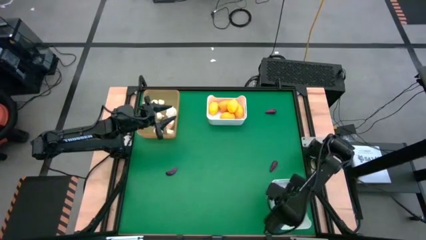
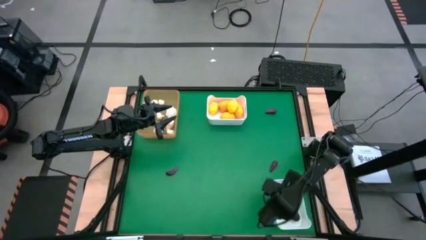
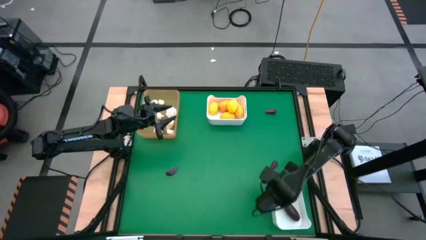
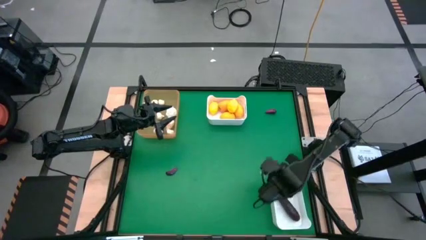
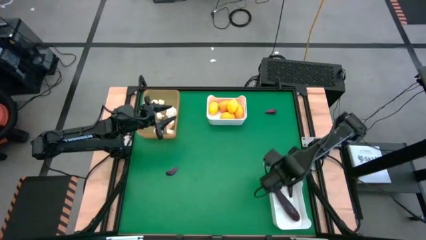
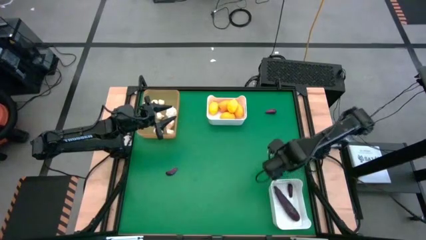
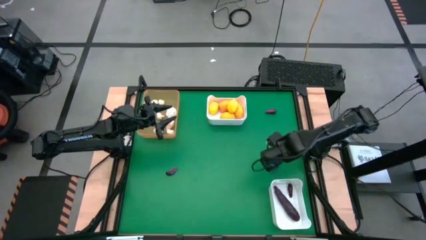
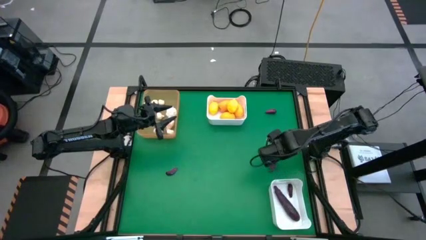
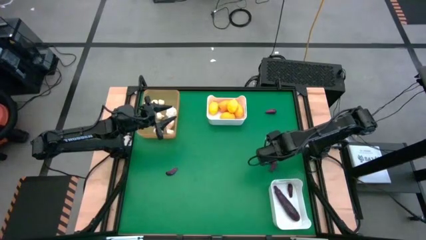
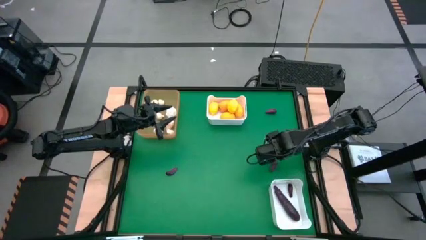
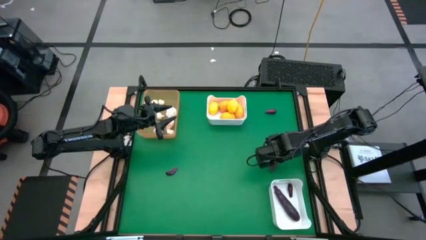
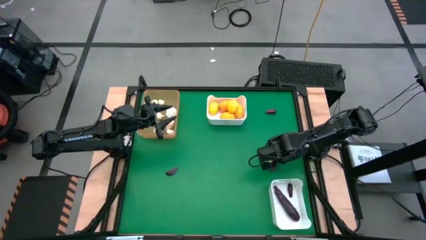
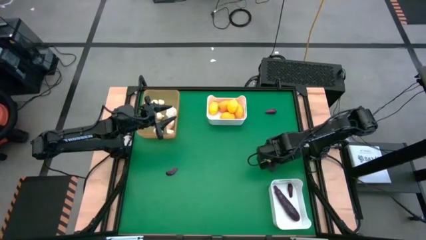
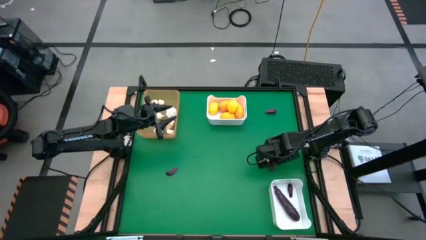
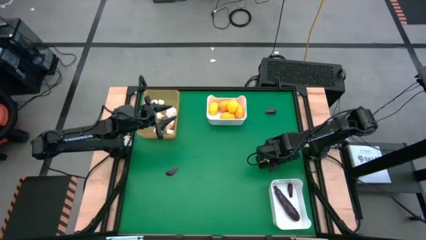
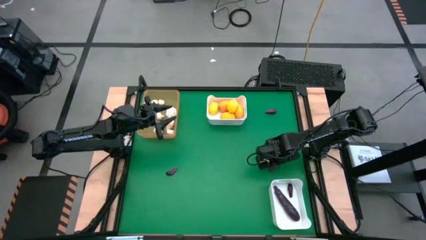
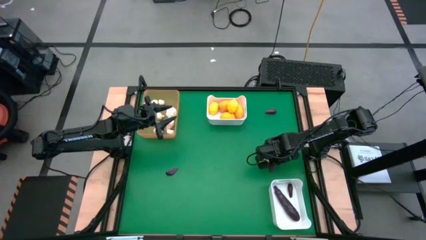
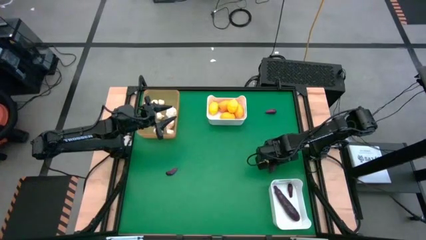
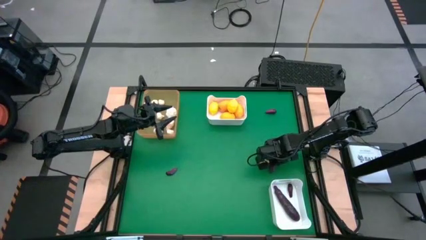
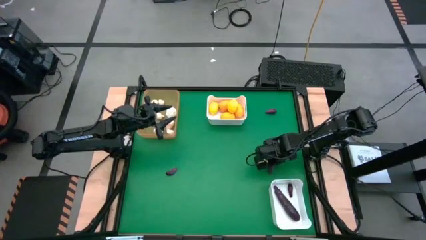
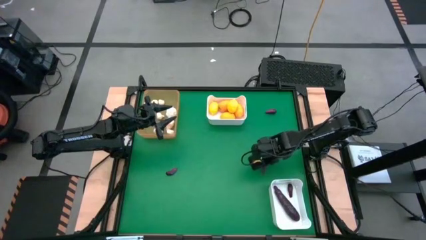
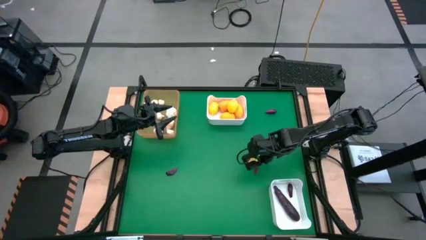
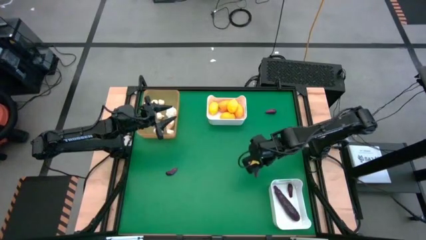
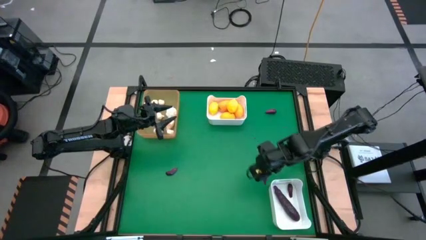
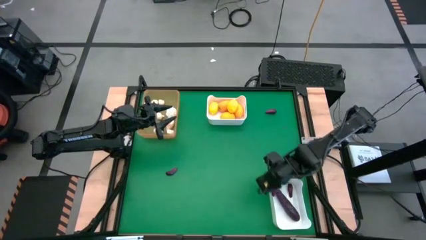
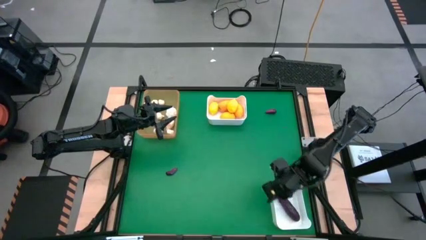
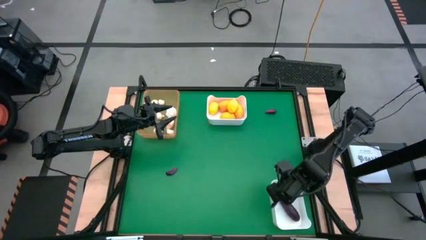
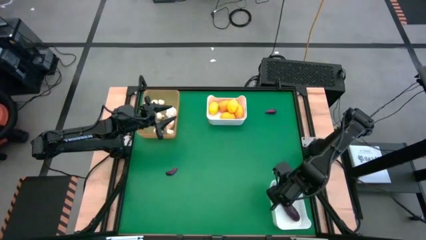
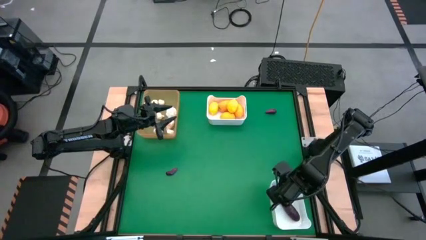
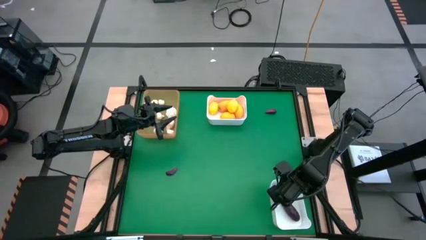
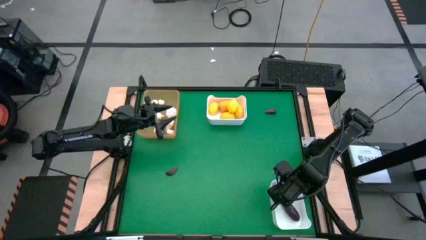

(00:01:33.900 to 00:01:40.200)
Task: Sort produce into baskets
Put the eggplant into the bottom white bin

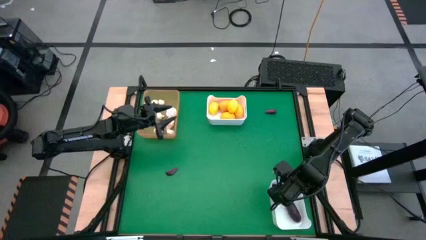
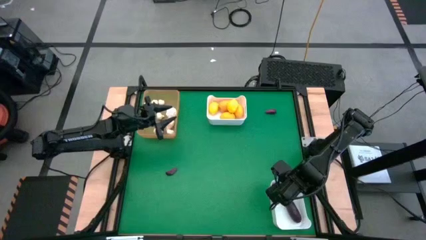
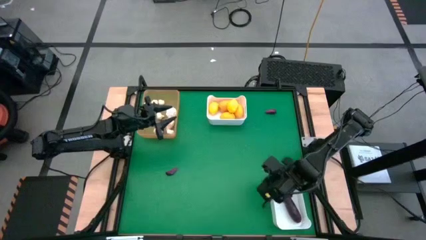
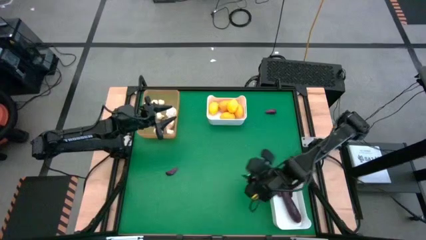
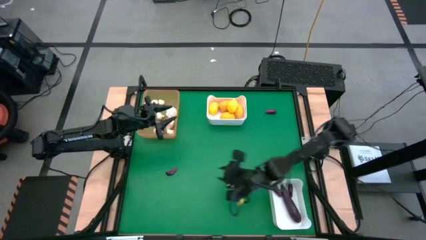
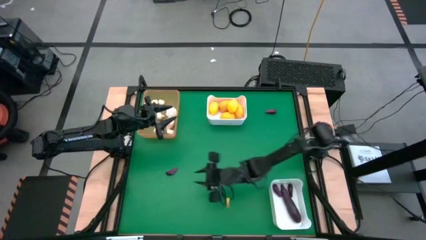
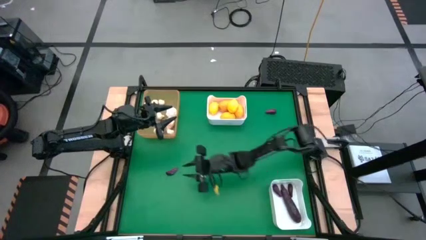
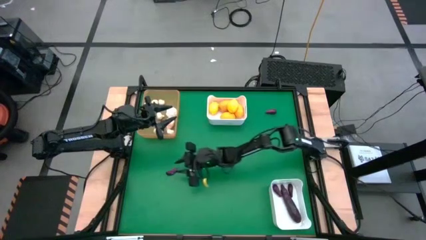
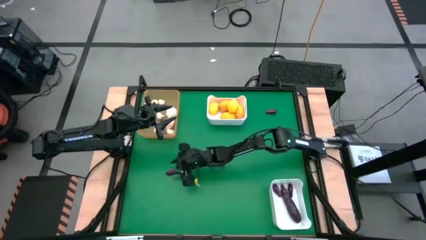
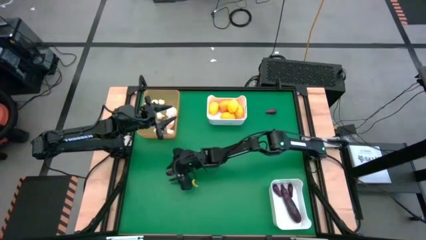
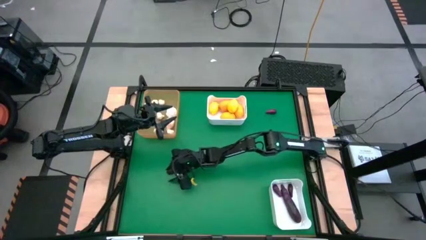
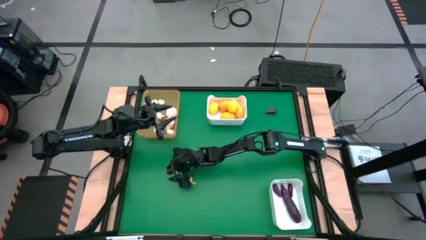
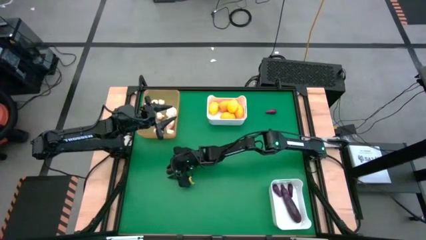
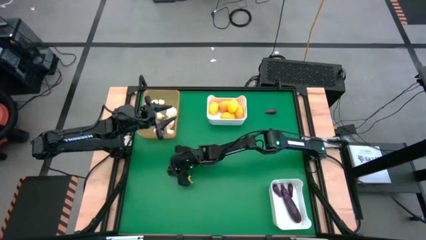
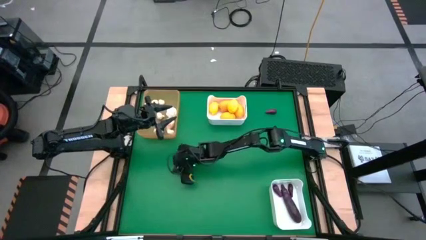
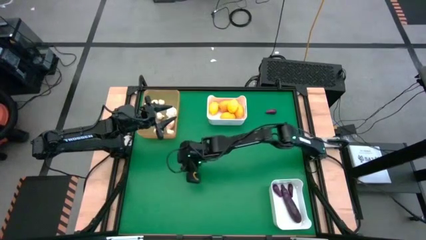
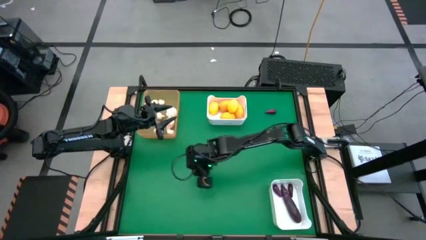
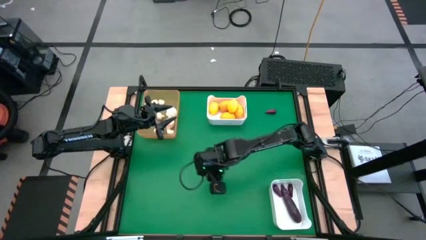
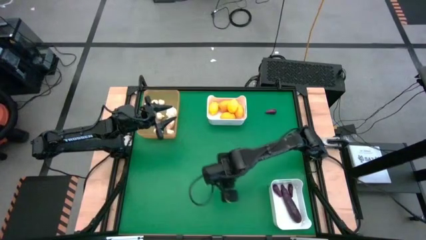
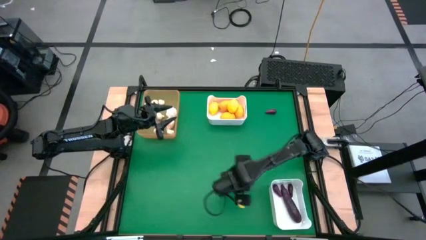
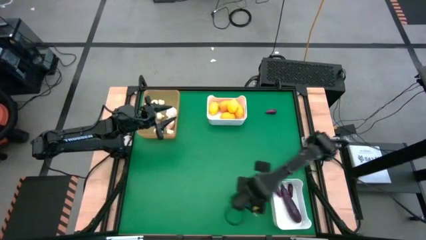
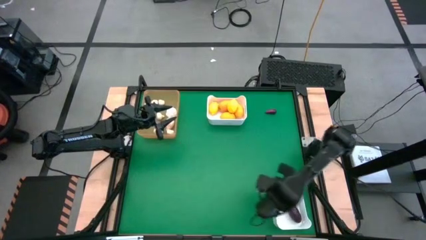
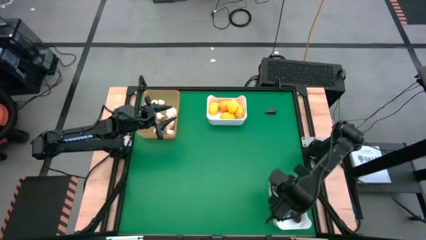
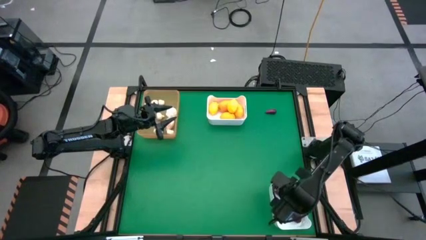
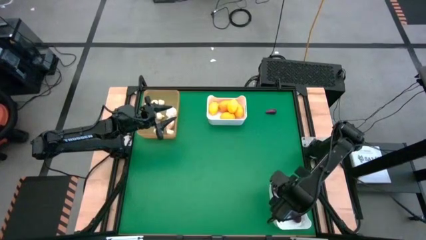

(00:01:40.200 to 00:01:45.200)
Put the eggplant into the bottom white bin

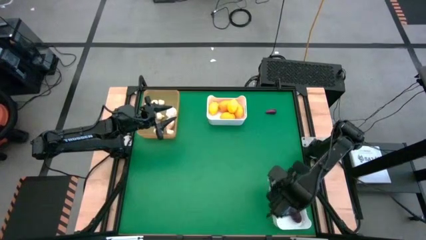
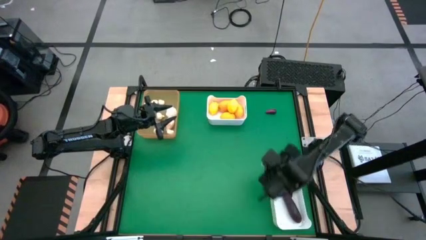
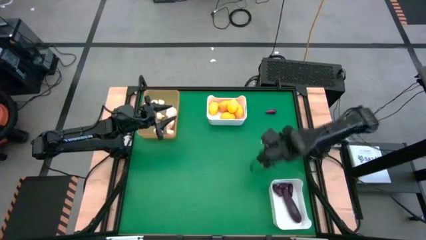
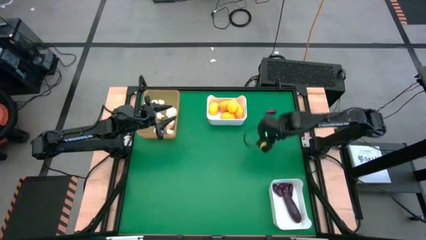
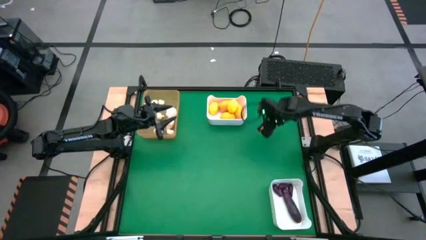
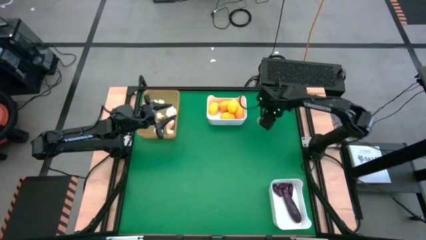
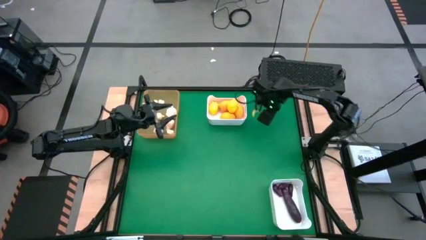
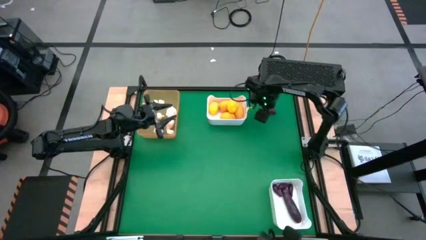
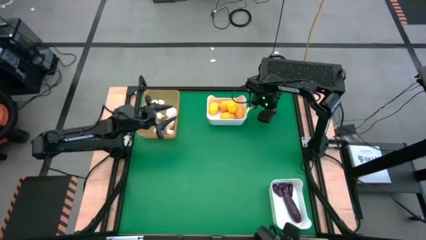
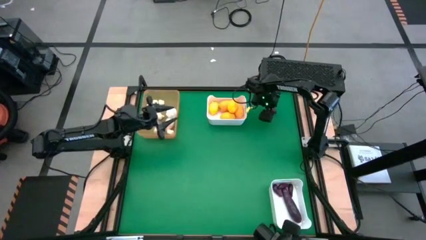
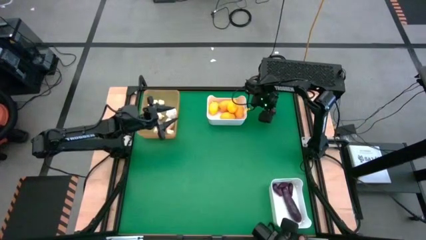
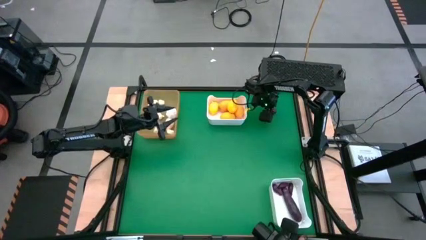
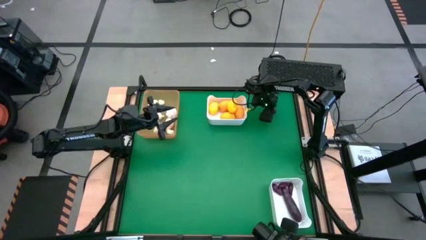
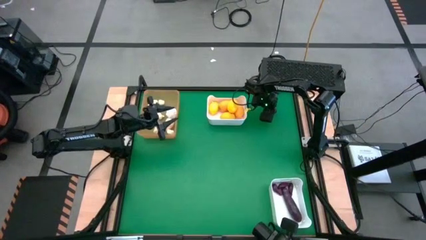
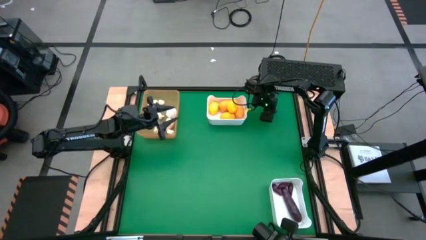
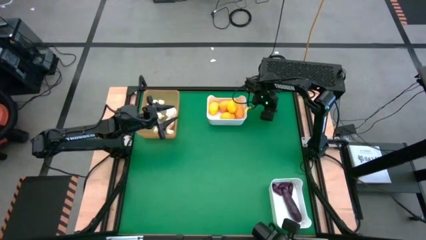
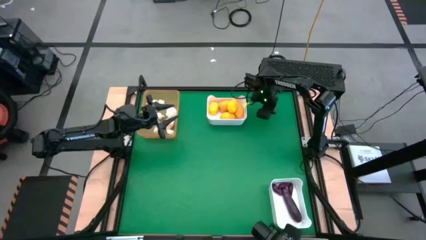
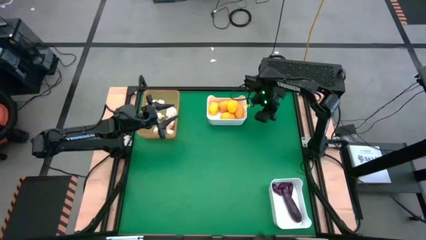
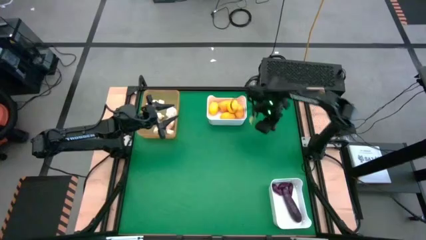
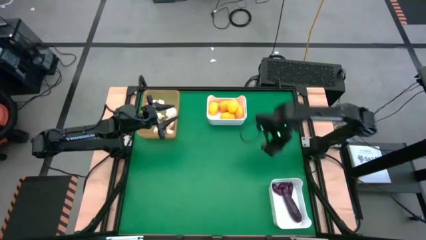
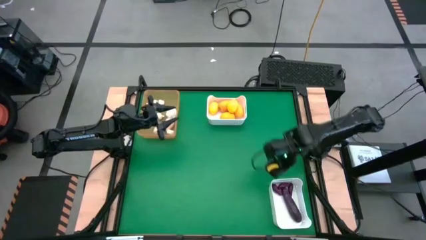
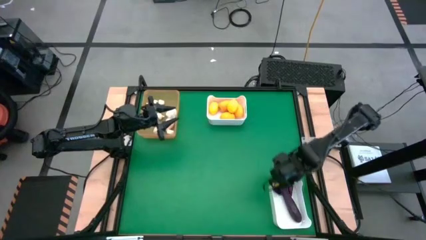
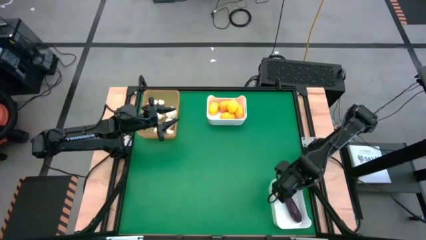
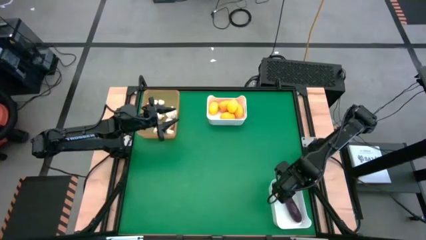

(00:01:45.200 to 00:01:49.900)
Put the eggplant into the bottom white bin
